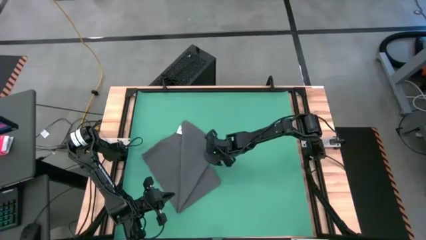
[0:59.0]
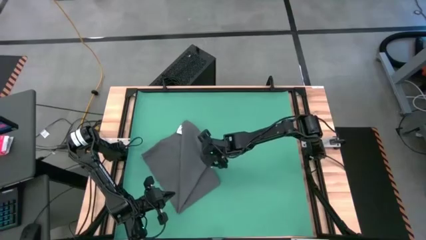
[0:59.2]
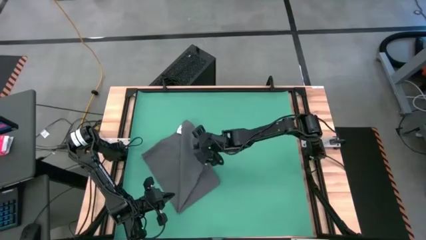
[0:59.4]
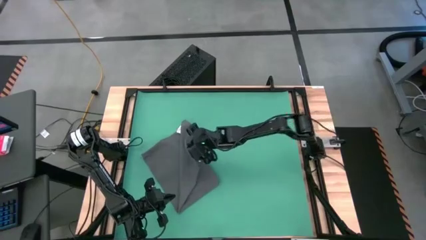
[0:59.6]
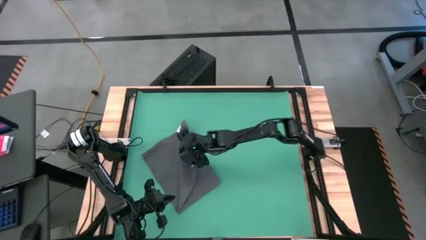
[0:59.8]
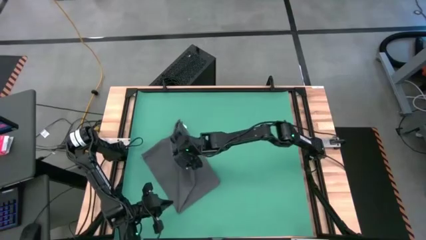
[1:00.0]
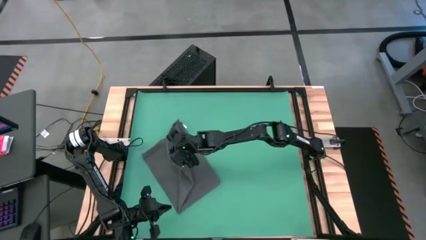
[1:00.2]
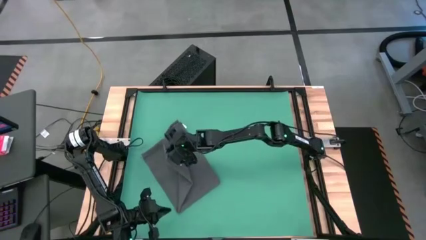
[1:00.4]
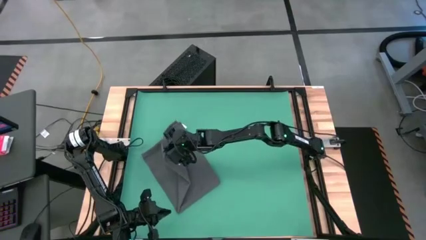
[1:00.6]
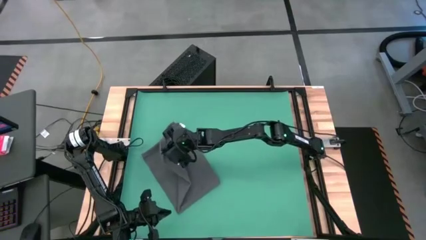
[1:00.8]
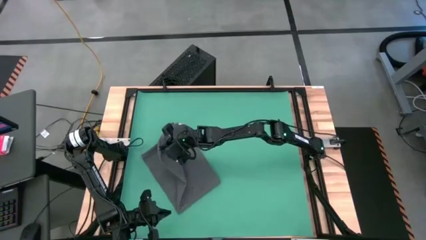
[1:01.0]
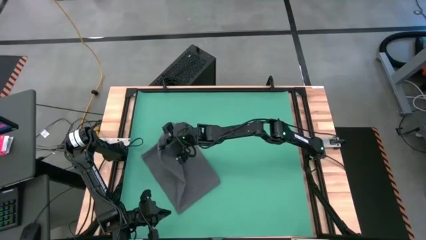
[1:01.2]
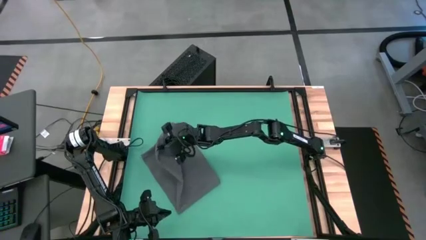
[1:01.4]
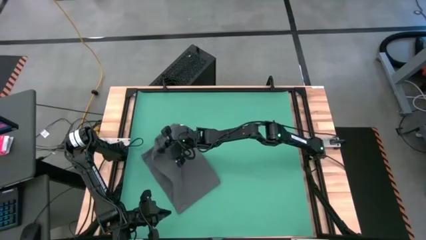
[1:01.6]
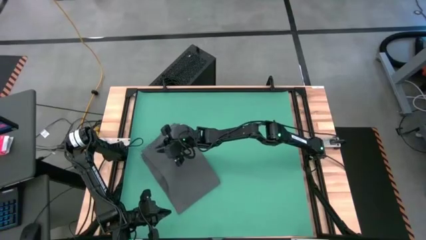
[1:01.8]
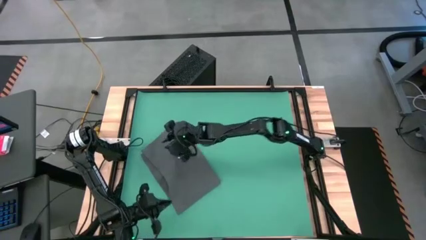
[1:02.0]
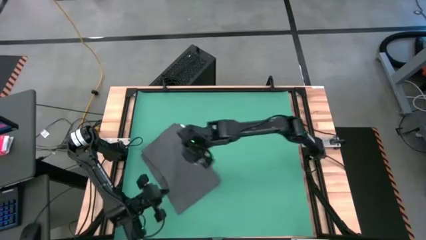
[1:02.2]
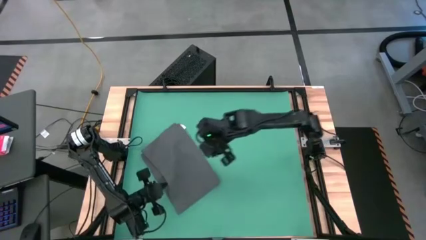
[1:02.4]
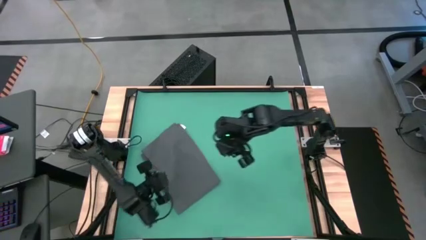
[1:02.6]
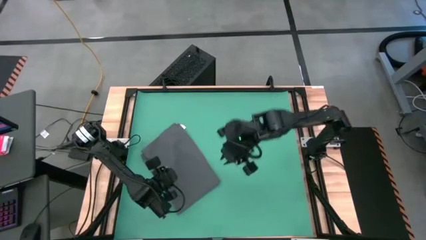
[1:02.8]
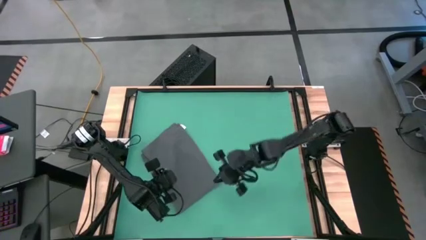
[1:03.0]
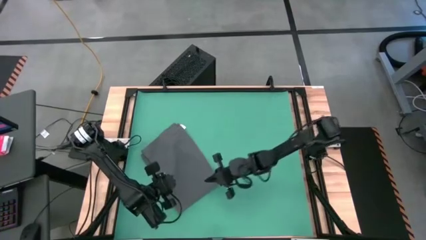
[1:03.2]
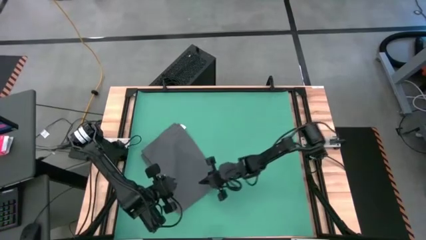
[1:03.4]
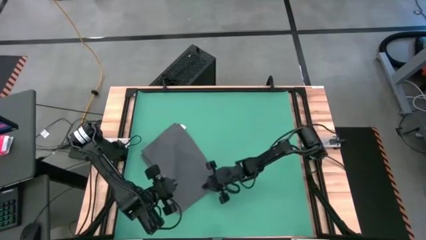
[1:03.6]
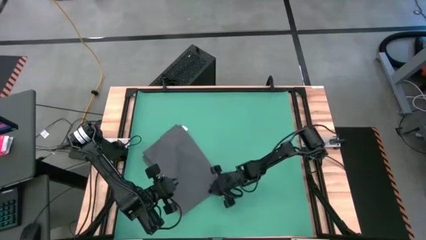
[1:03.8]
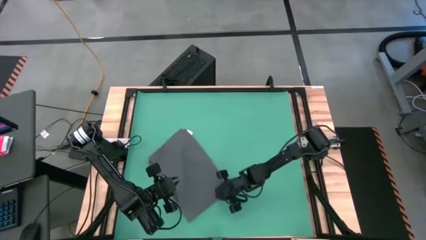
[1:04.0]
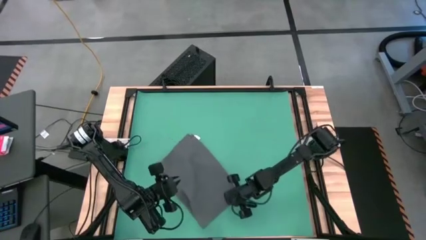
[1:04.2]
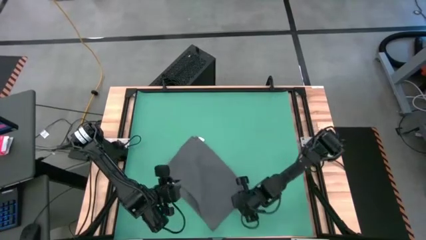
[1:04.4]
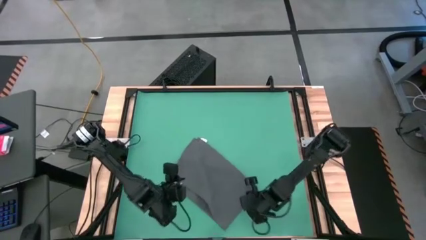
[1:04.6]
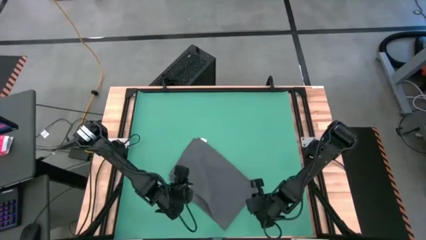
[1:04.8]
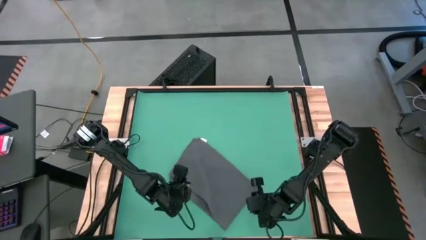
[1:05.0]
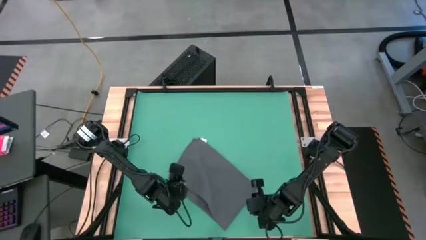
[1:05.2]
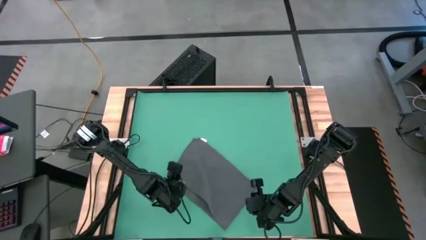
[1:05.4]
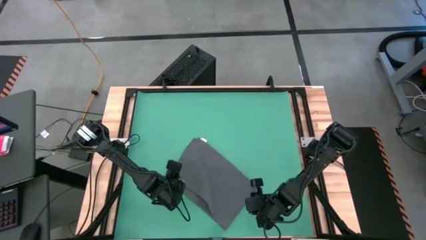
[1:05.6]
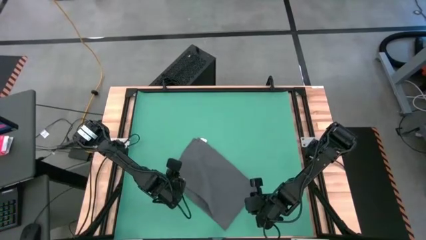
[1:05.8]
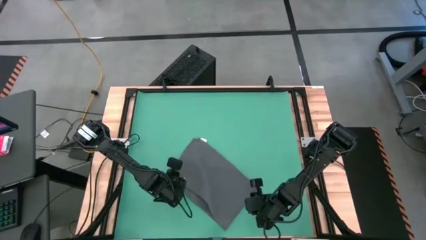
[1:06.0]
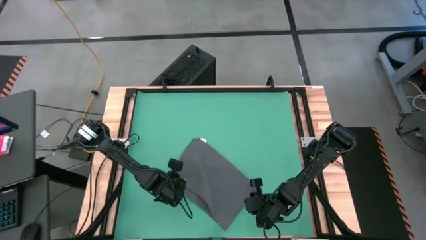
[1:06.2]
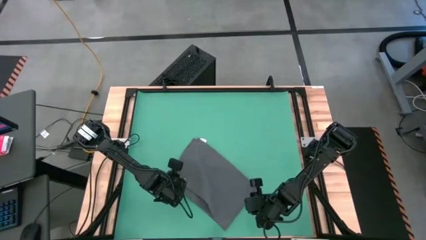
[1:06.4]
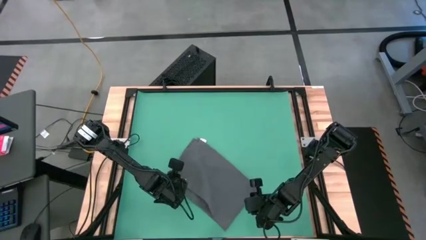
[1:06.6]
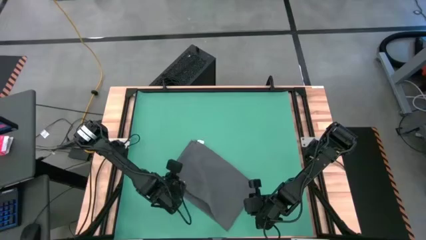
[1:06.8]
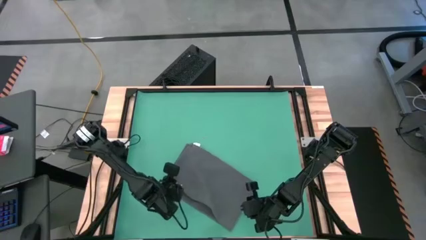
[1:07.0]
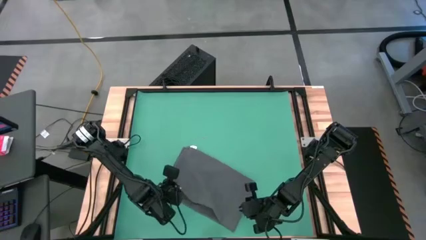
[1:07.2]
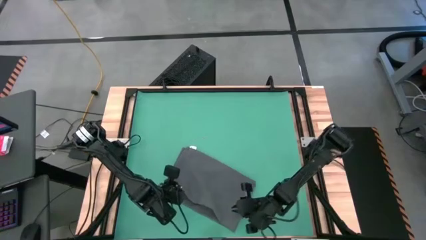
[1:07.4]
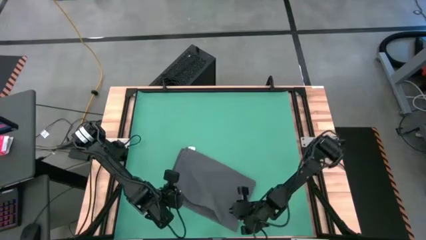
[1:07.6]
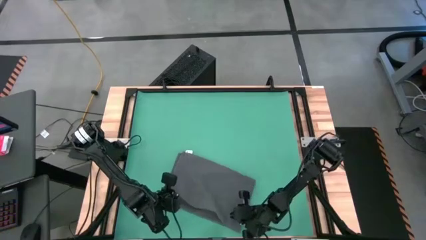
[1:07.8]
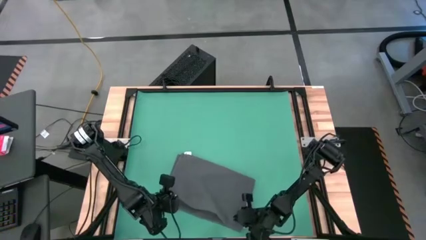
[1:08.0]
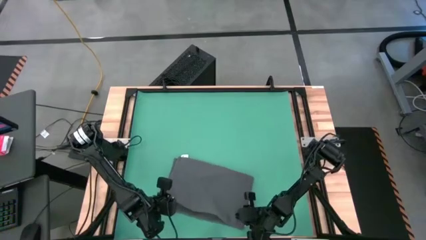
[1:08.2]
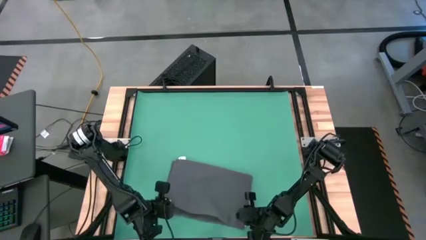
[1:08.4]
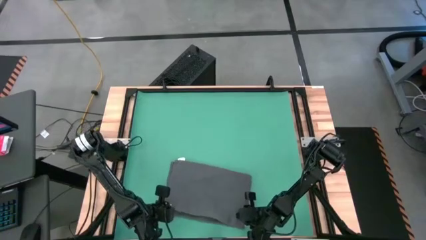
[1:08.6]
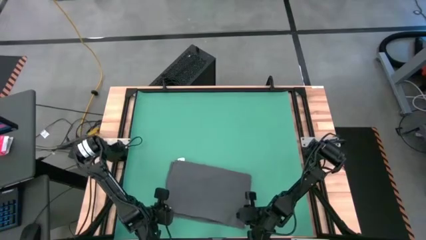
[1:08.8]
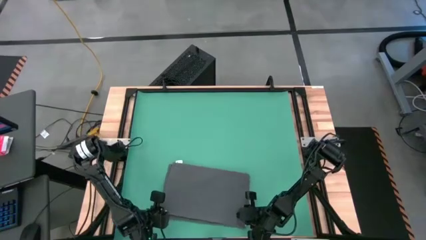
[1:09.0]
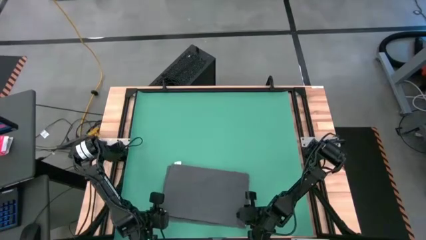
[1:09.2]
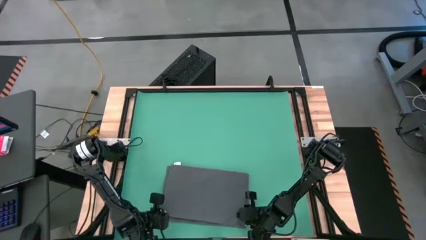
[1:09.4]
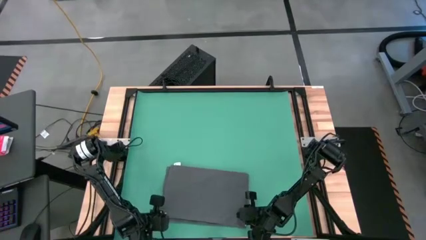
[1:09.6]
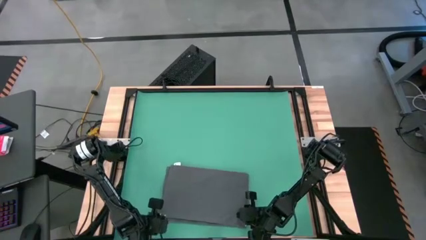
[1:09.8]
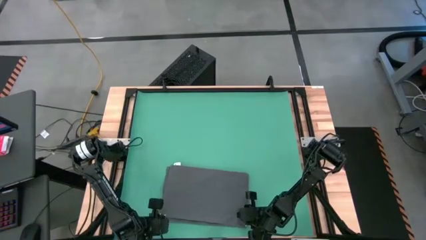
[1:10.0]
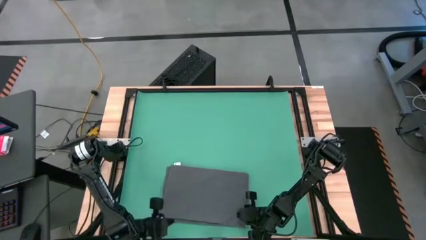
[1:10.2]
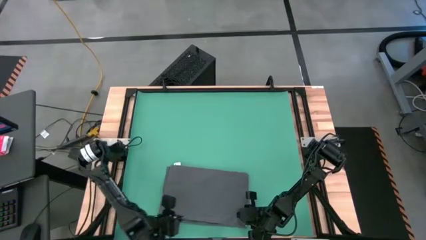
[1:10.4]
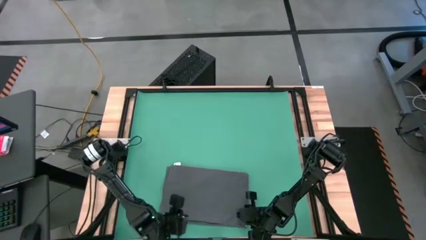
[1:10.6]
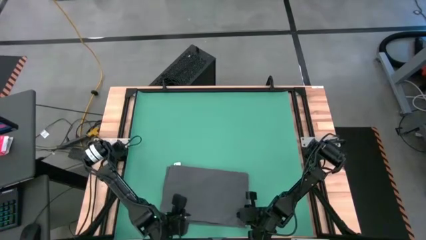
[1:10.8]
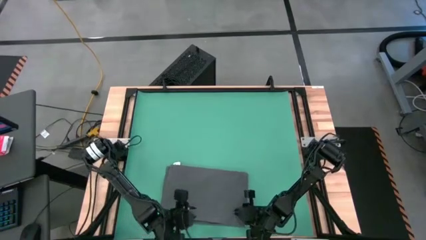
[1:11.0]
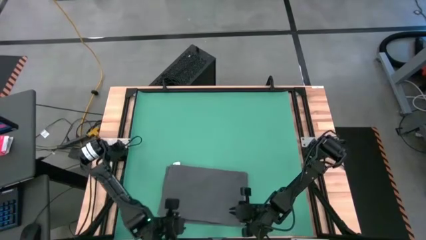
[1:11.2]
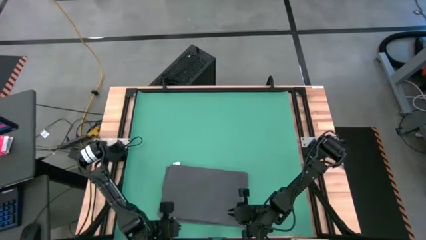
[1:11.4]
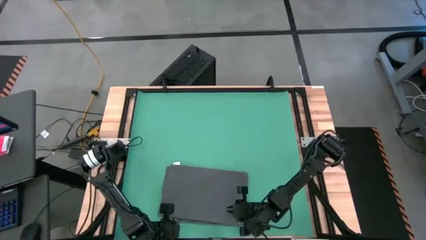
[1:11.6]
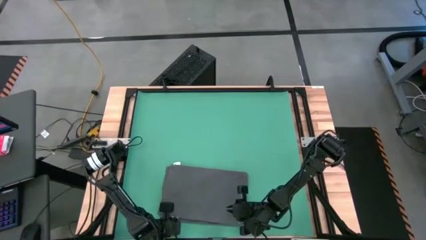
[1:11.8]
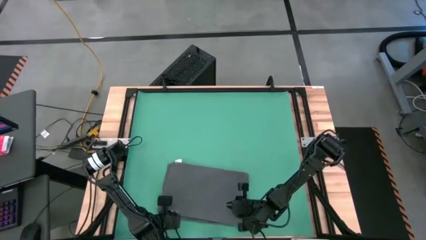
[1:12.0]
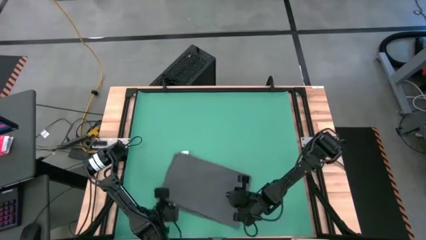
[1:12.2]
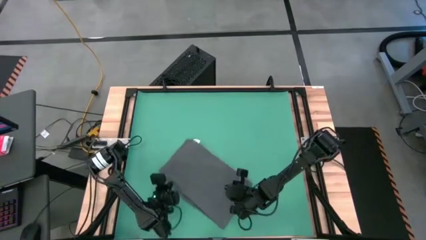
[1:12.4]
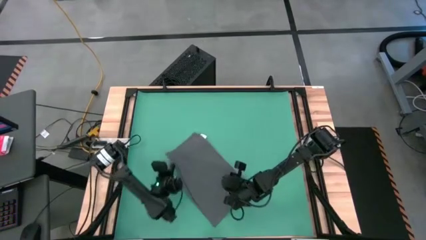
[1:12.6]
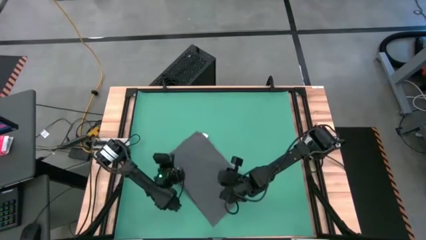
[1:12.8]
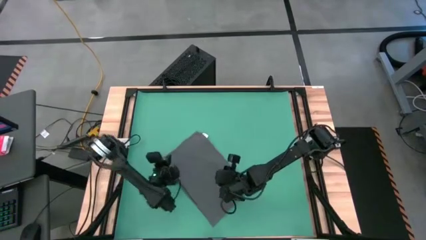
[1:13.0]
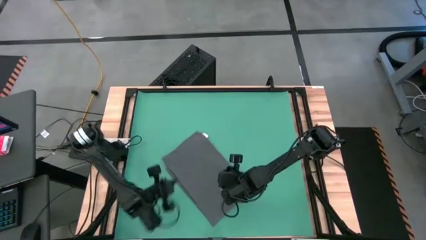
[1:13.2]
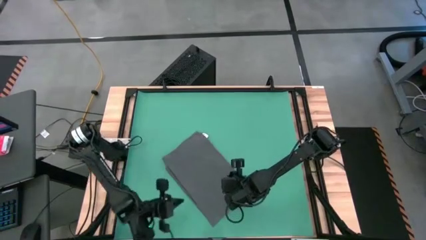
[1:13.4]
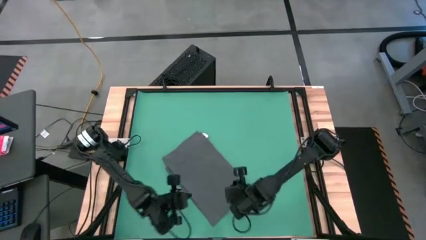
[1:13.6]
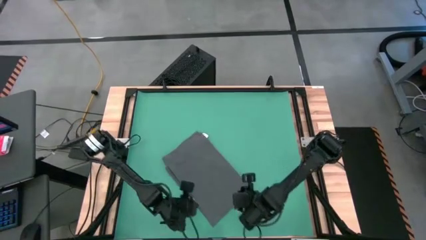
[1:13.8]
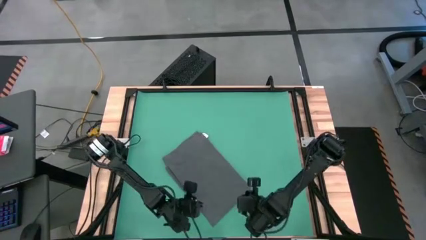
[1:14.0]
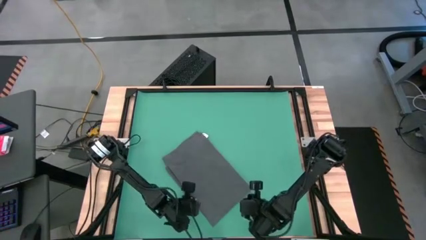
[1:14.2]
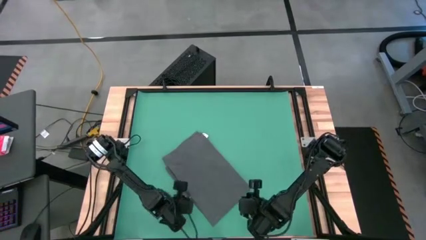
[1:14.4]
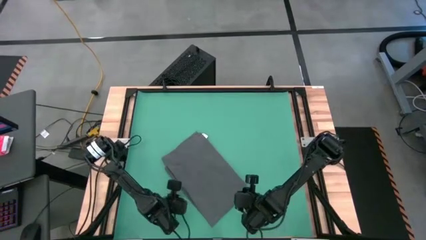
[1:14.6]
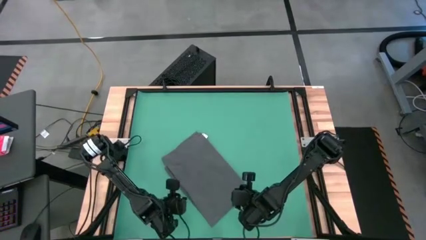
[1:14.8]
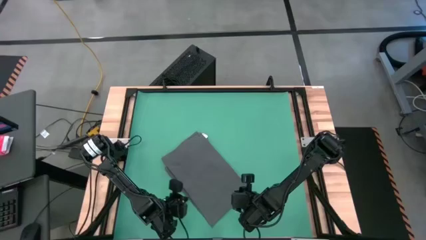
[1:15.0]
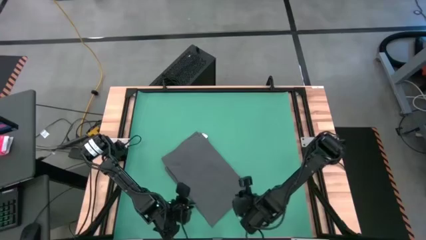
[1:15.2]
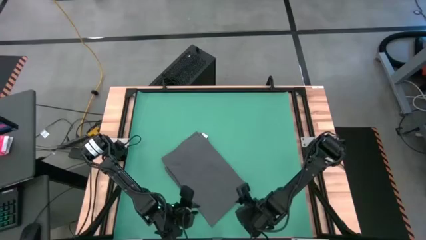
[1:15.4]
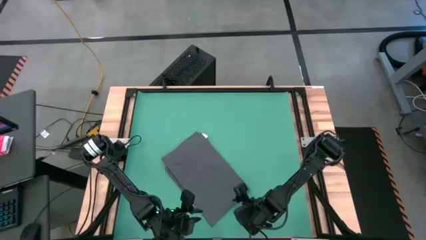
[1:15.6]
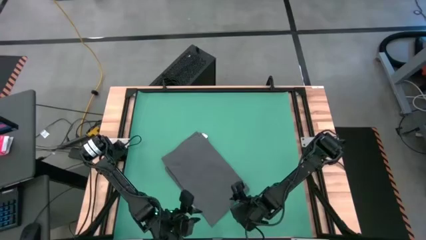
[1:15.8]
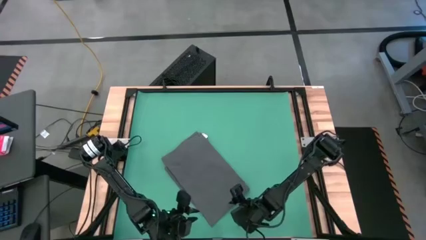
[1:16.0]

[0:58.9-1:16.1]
Task: Roll towel
Roll the gray towel
